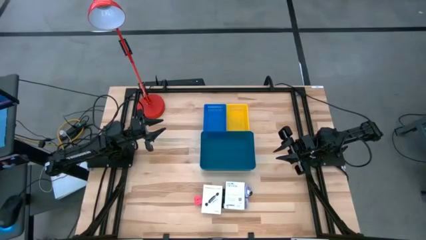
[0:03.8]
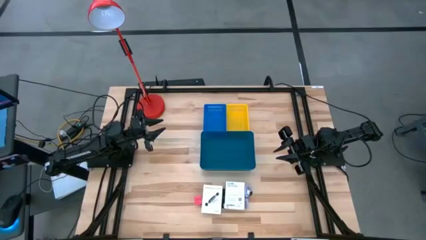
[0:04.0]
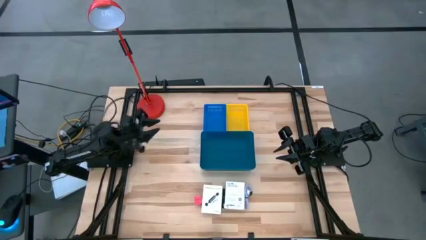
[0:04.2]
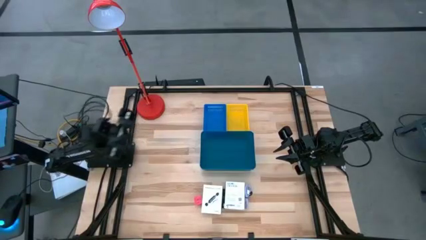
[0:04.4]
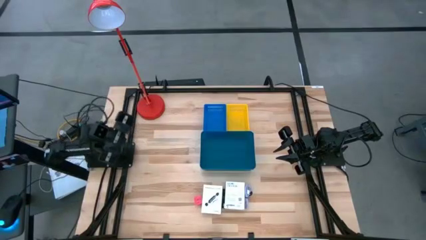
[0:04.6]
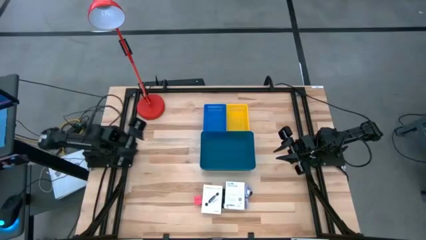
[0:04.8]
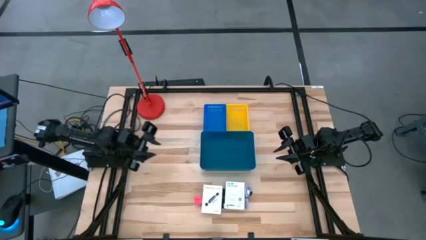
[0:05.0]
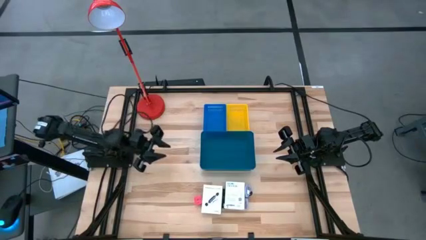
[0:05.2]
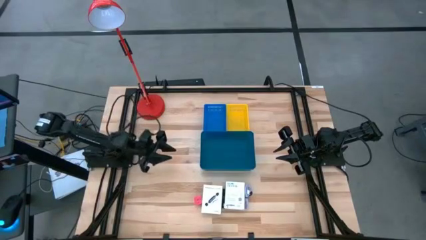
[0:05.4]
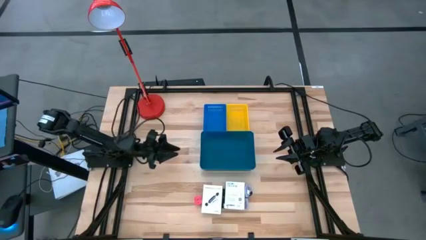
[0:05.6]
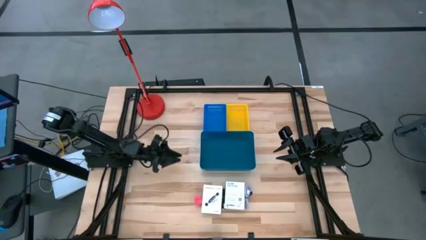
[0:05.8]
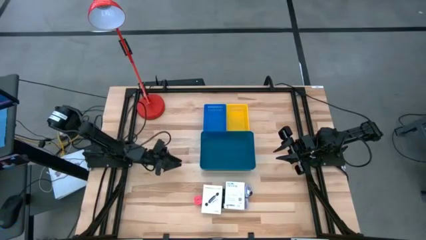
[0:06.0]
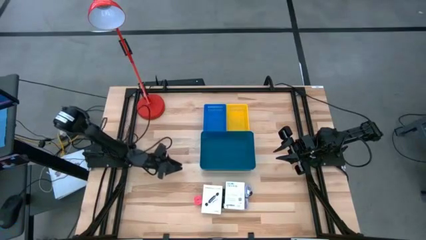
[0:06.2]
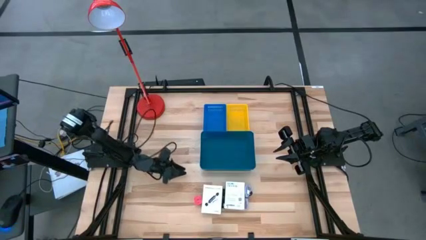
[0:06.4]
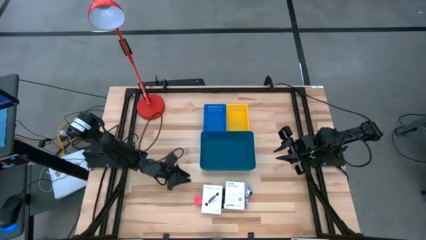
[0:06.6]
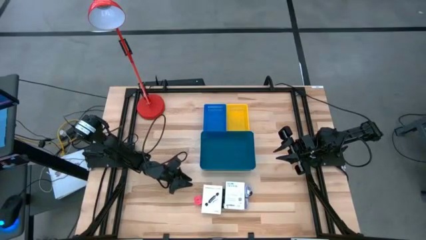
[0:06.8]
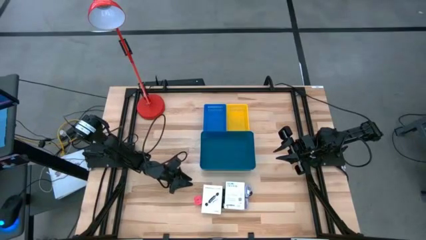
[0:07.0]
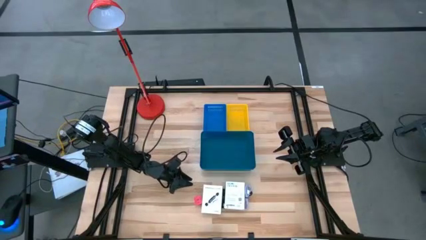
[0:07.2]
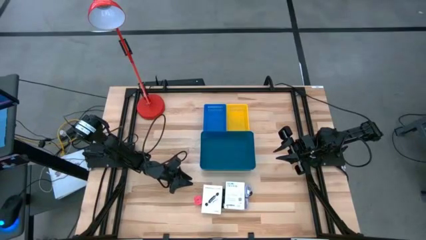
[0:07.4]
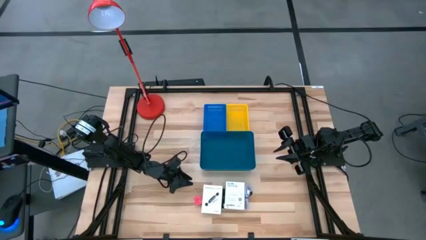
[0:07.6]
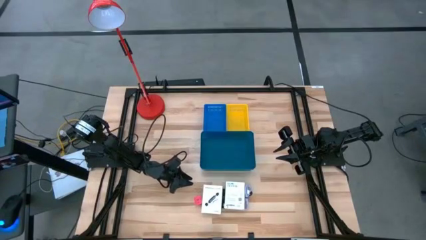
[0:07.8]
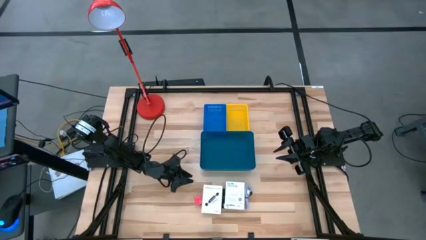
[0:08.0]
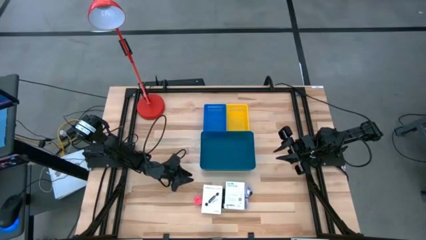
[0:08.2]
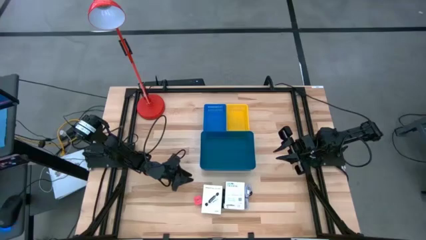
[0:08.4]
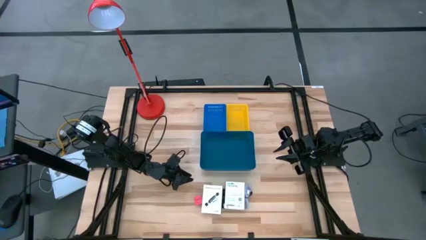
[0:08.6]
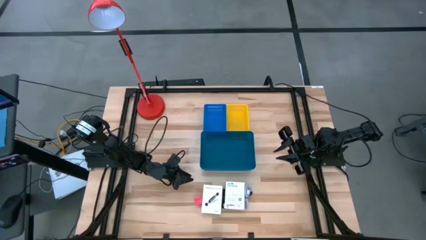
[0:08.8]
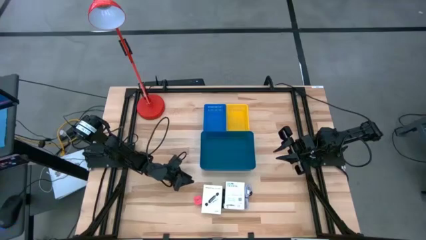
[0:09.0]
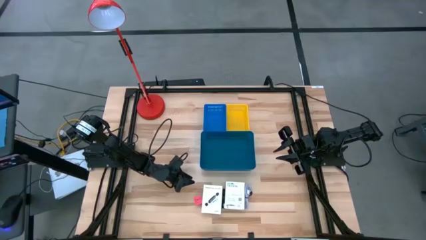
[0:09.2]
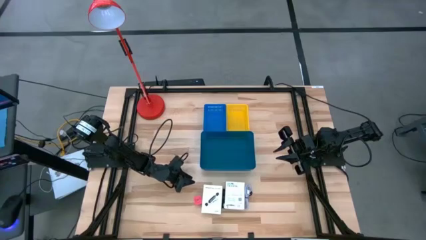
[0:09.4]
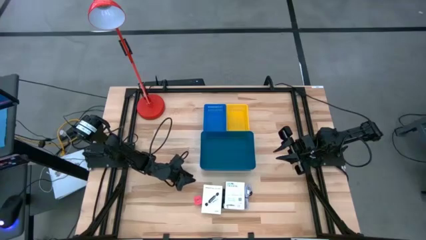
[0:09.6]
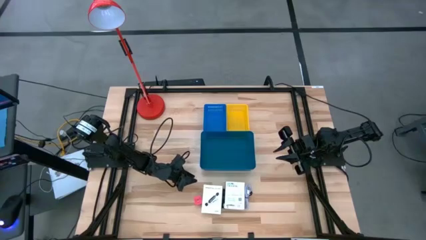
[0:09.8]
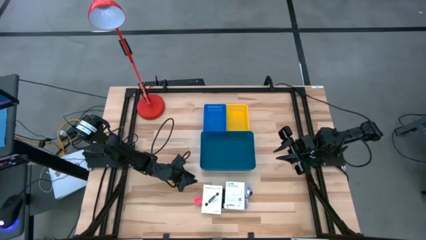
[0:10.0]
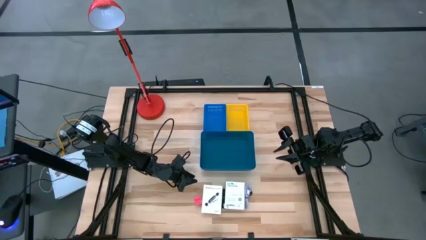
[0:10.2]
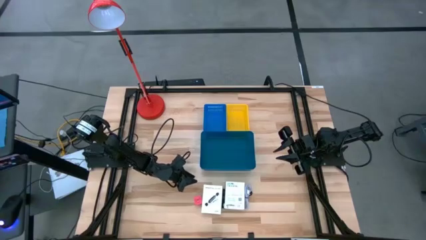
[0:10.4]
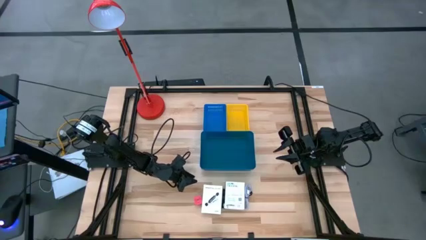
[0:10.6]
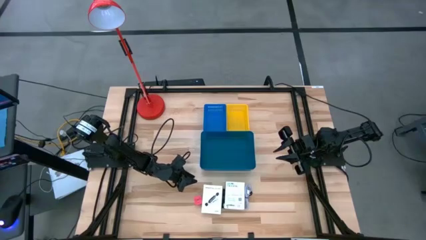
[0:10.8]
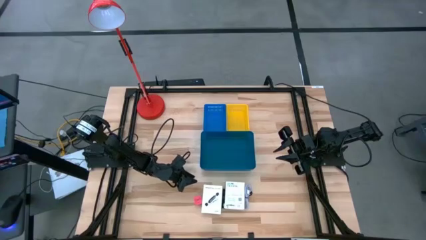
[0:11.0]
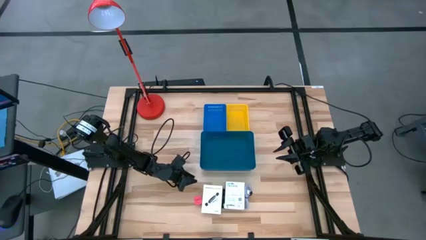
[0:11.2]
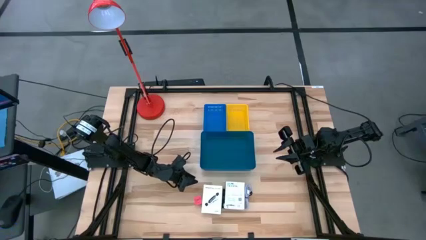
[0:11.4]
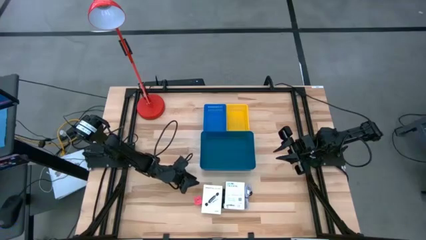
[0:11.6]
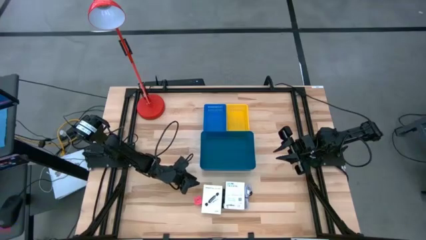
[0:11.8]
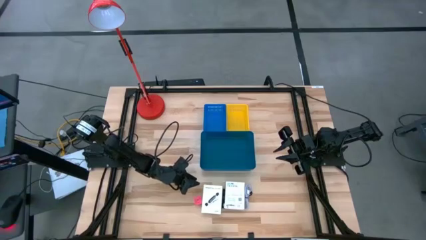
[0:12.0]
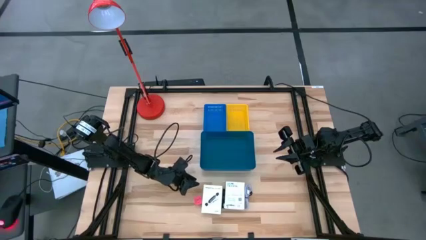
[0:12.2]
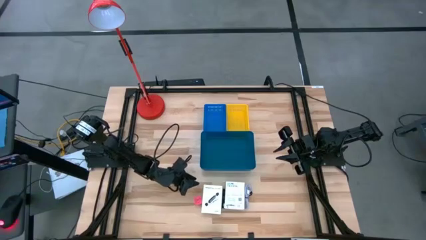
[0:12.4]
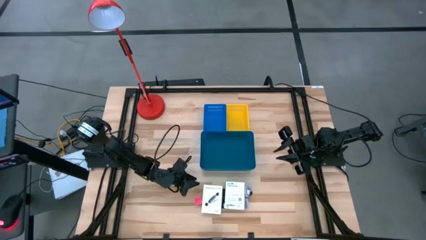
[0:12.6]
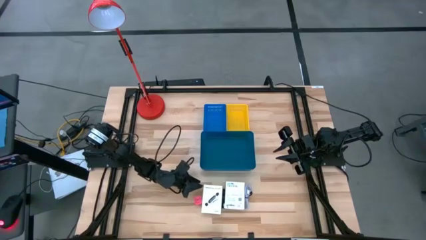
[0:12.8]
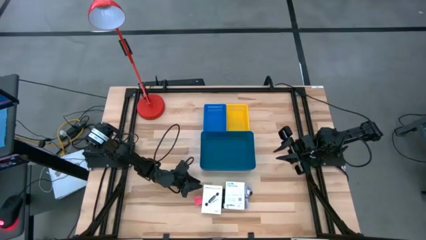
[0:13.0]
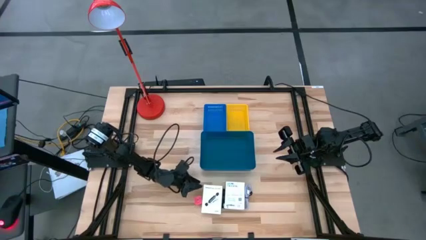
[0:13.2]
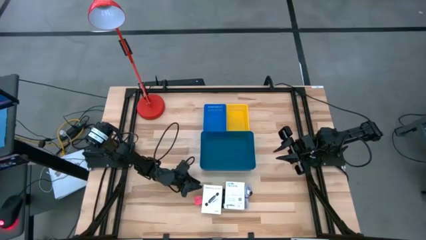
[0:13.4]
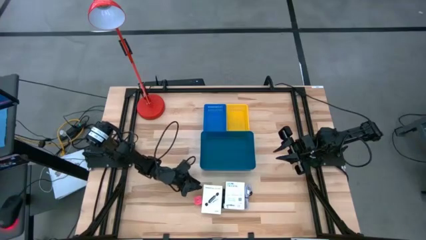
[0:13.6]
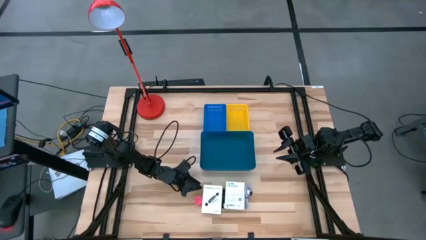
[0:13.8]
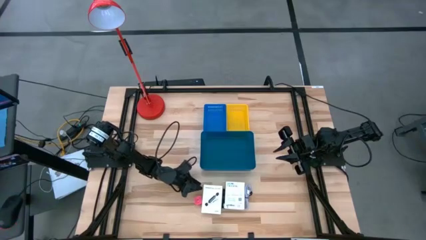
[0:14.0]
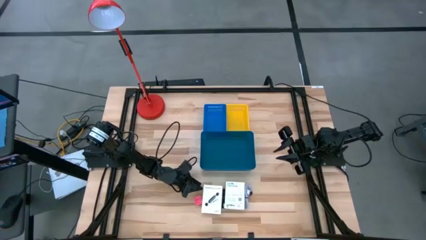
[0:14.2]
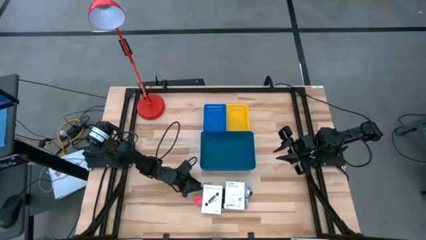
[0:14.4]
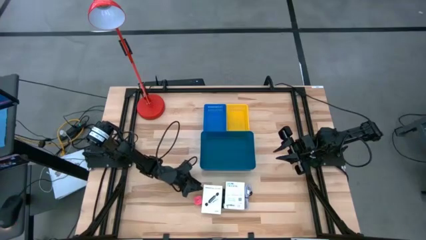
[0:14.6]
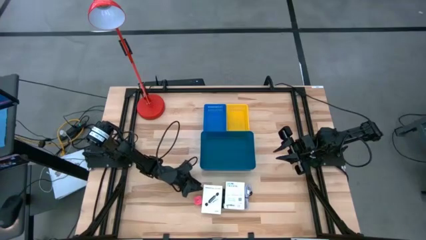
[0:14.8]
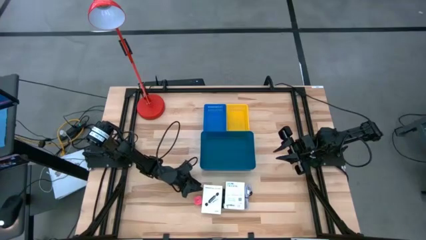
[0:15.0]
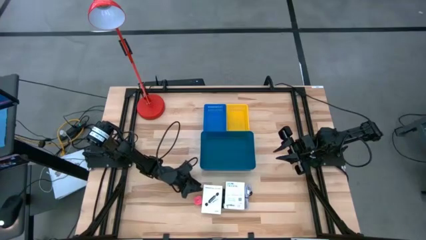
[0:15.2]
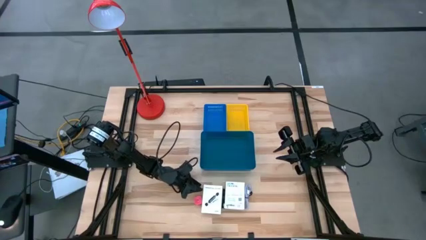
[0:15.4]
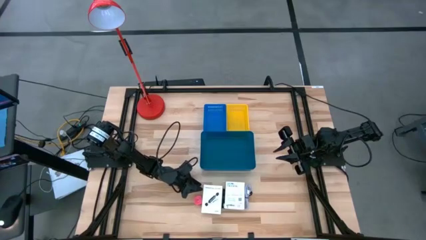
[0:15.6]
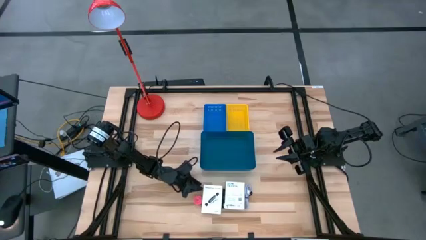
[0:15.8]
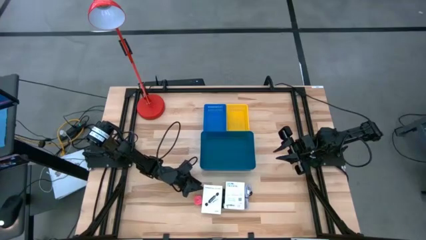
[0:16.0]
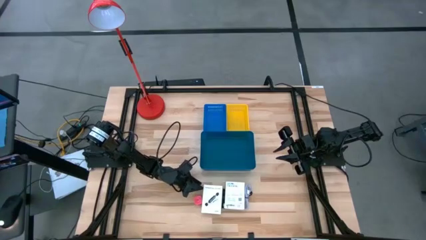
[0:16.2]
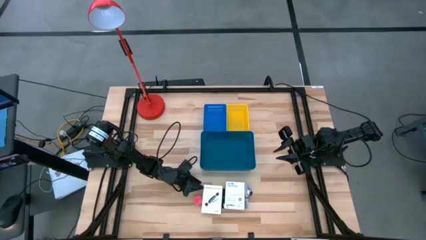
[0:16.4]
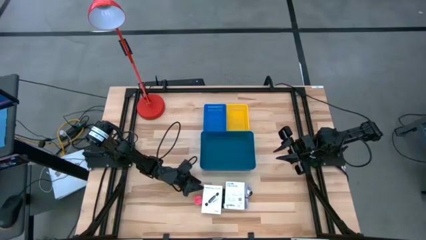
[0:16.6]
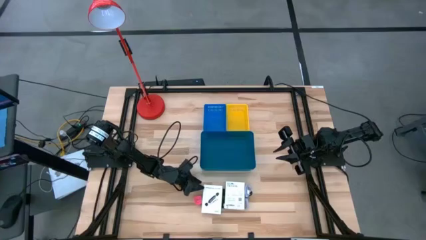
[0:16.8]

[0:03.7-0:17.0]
Task: Pick and place items into bin
Put the left white card reader box into the top blue basket
